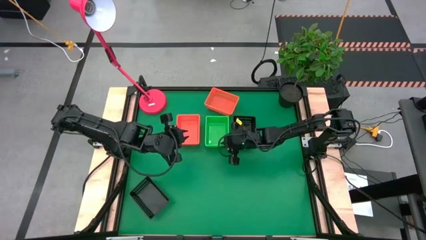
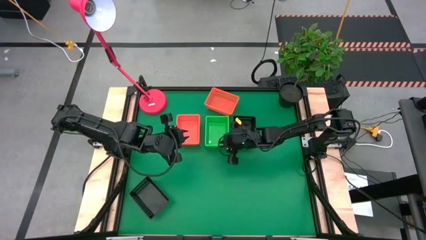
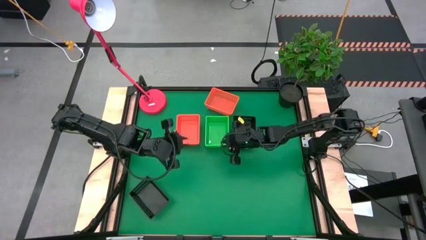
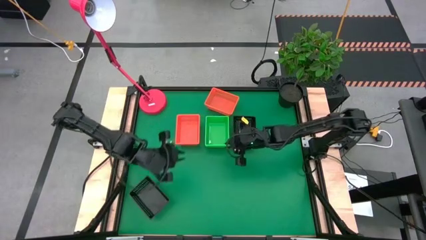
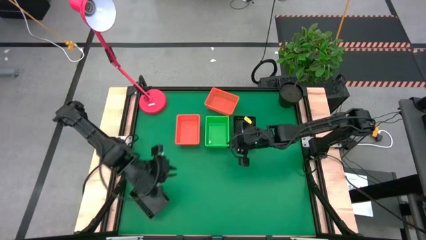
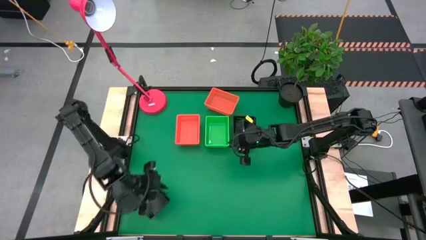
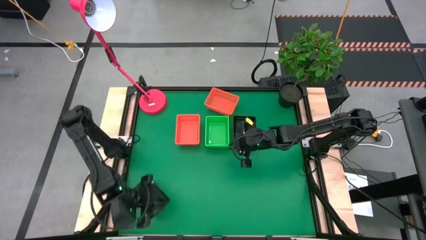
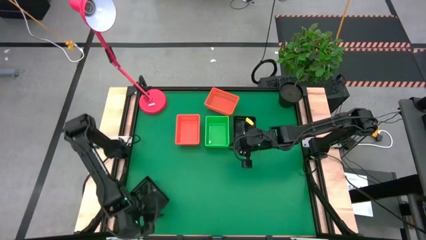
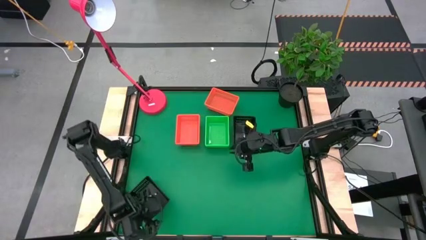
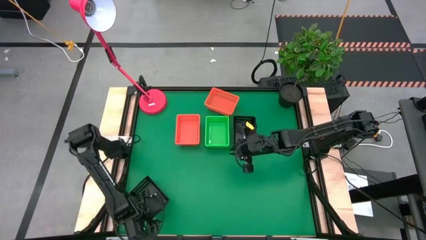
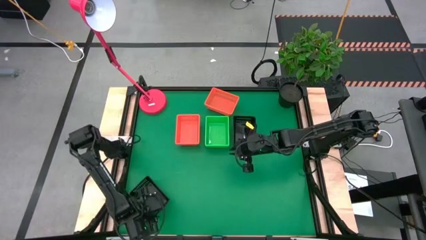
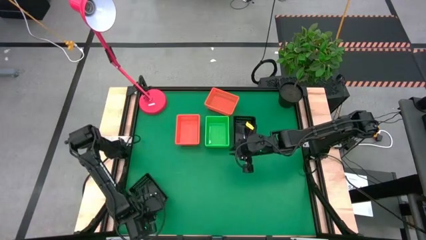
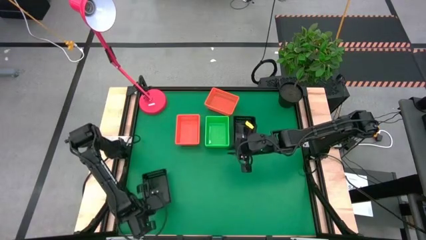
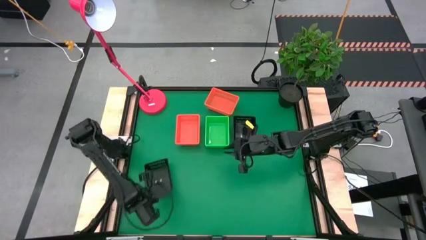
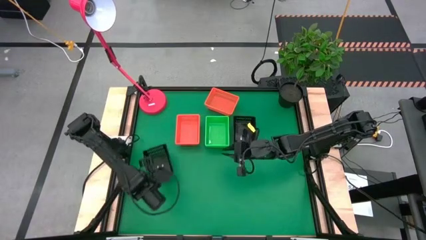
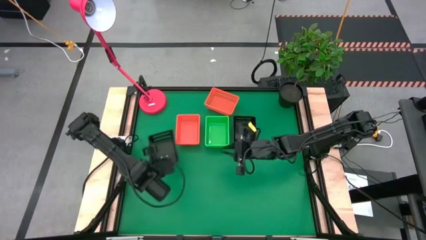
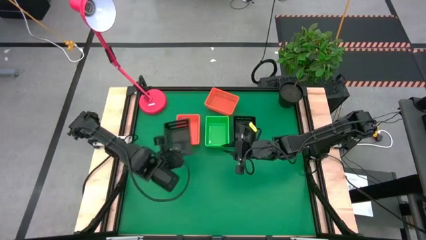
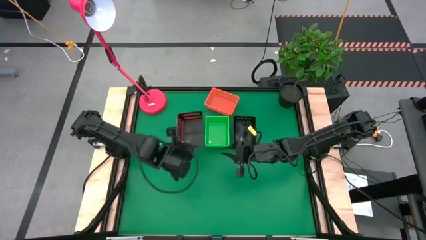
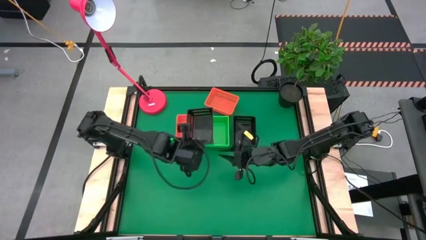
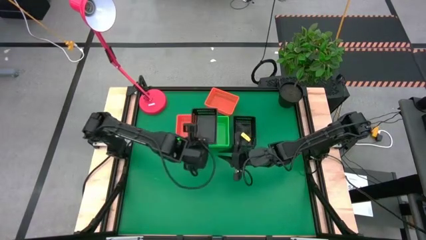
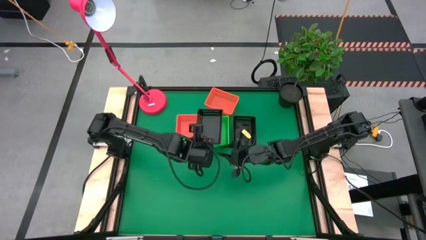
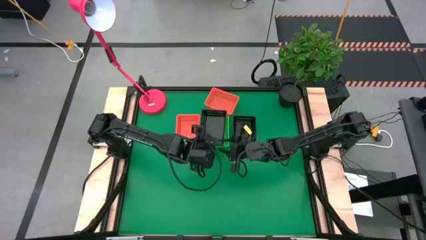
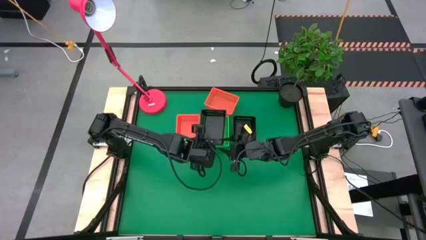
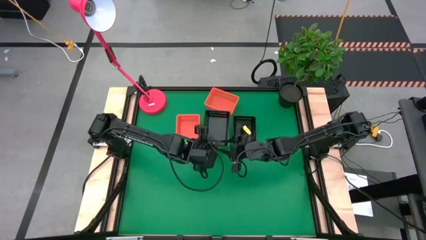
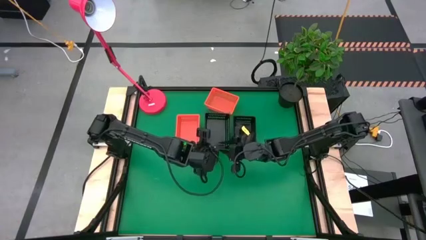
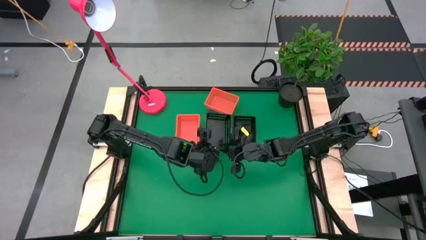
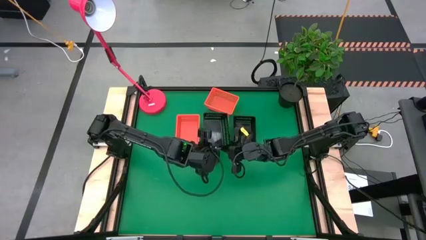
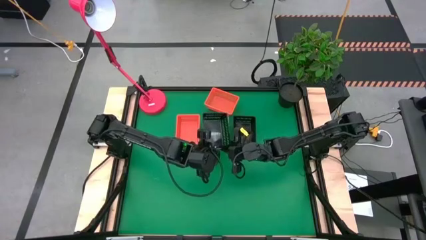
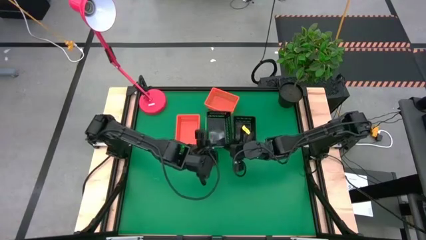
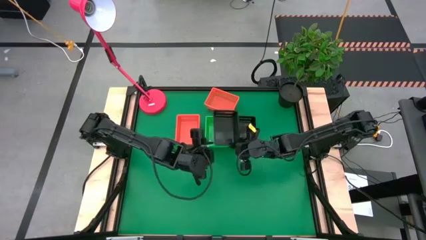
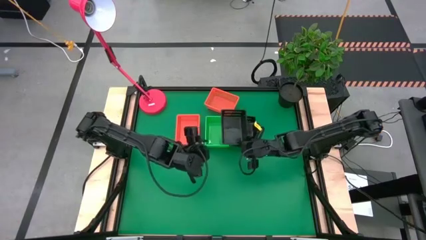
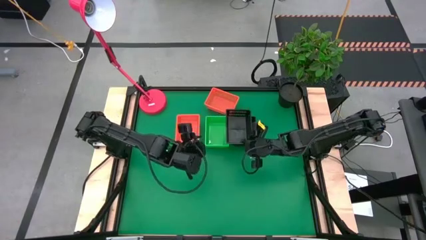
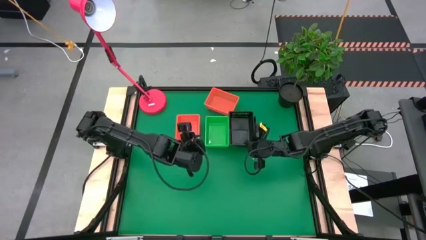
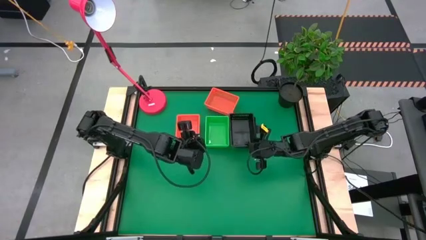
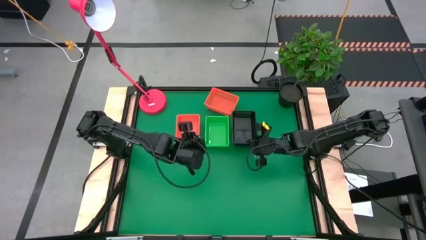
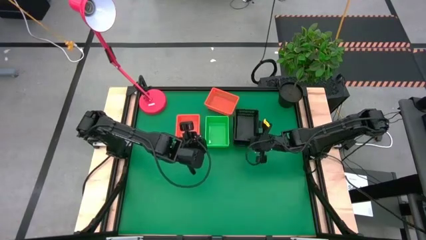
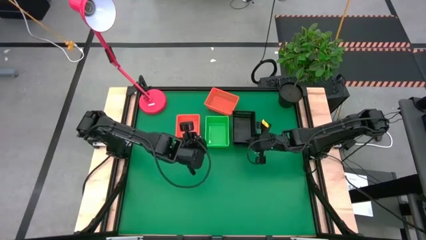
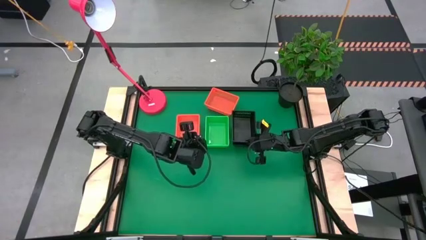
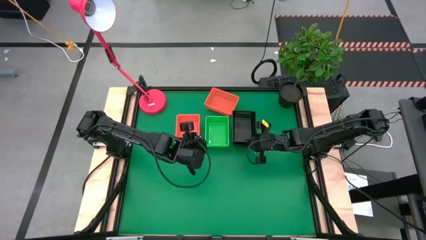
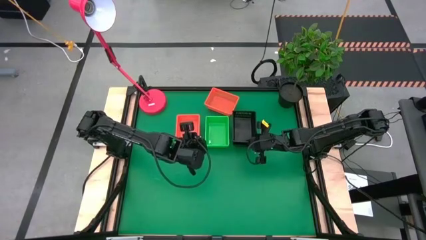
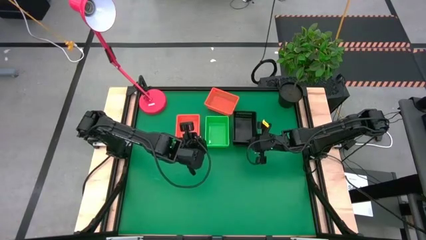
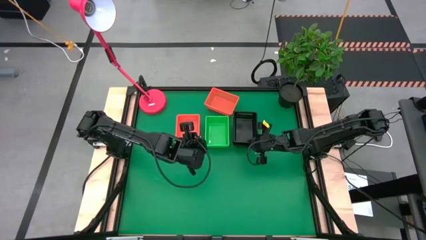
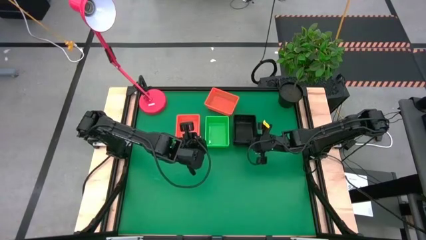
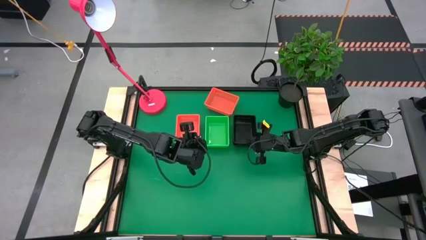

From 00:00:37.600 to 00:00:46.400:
Stack the bottom black basket on top of the other top black baskets

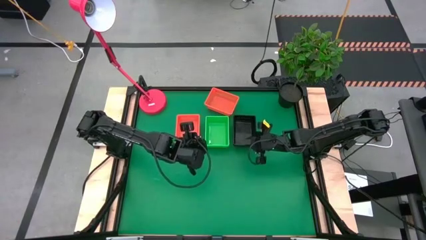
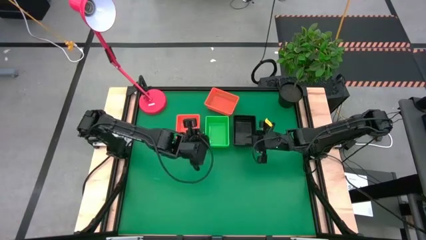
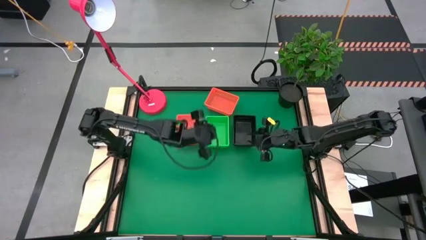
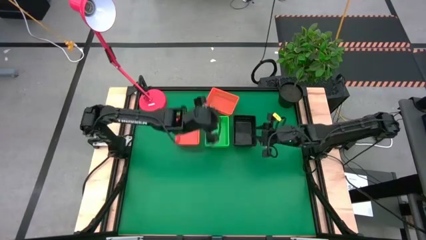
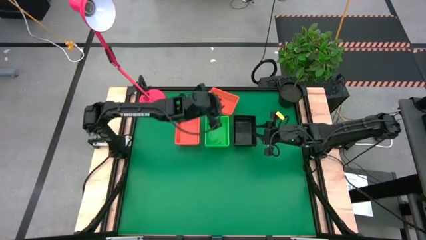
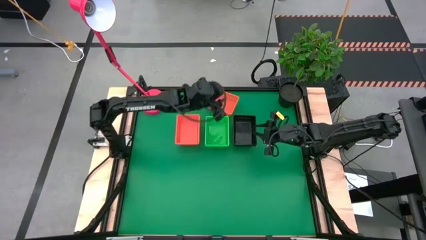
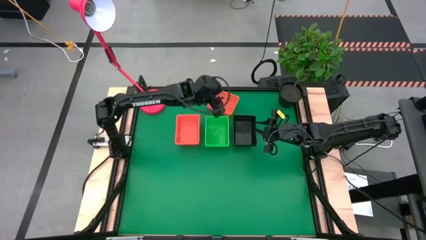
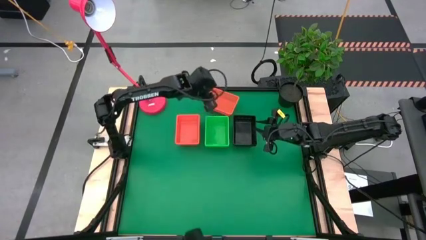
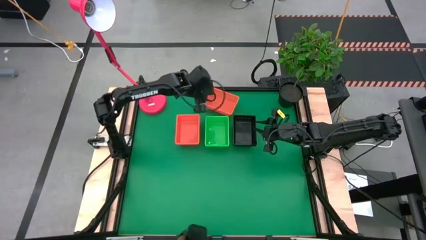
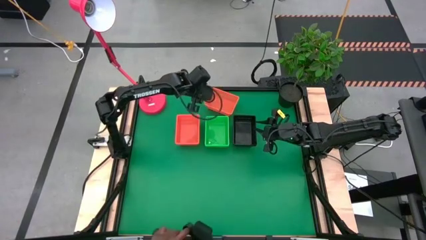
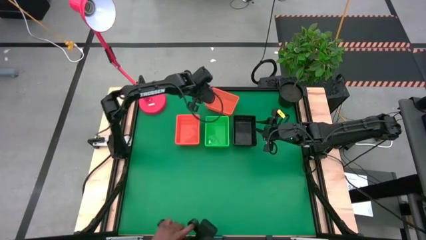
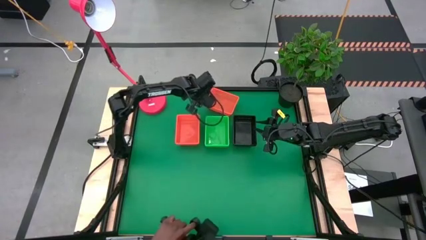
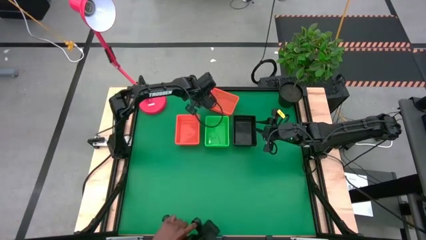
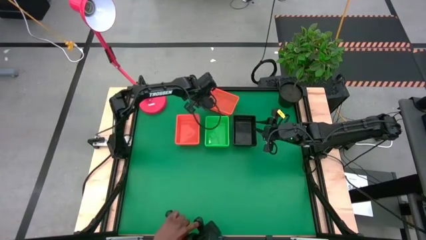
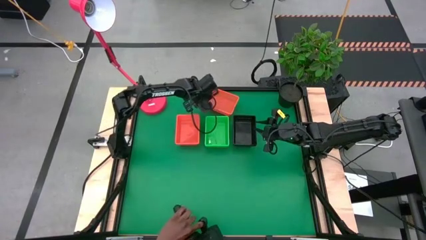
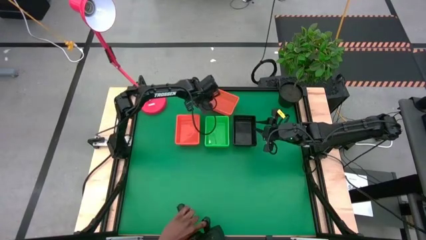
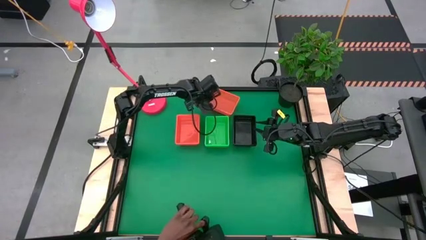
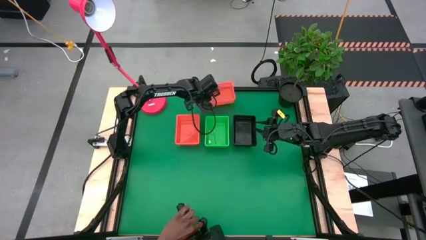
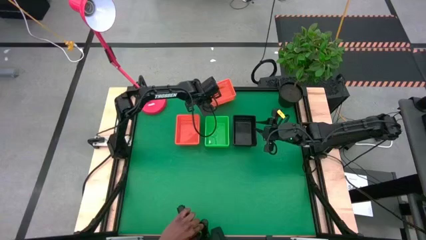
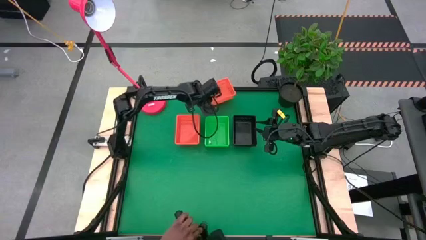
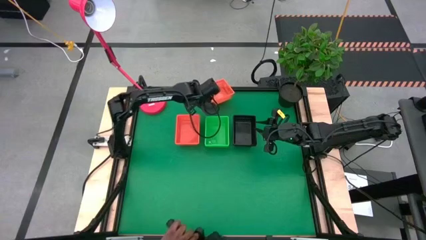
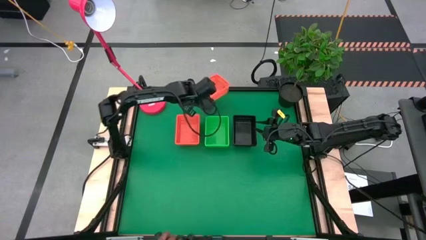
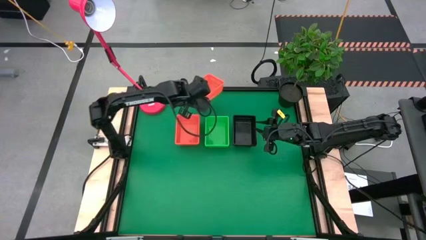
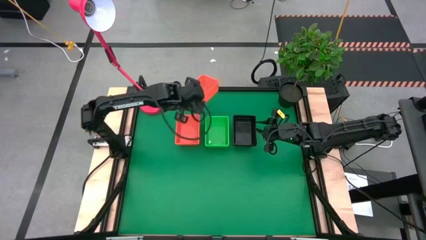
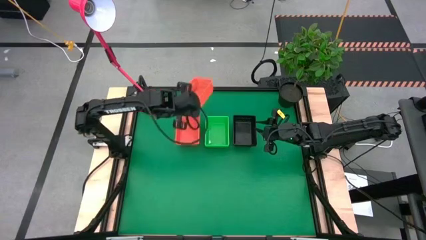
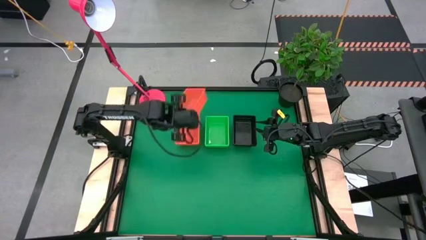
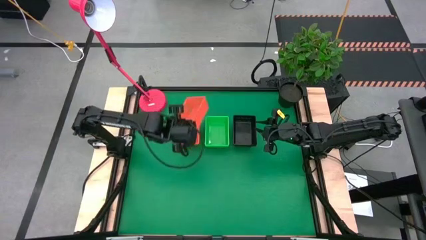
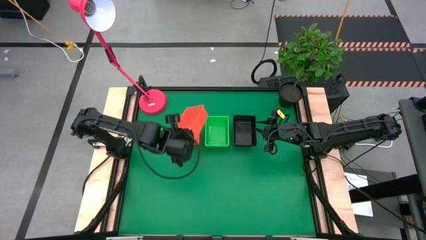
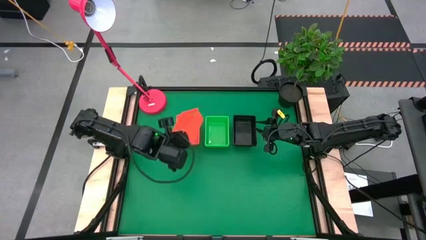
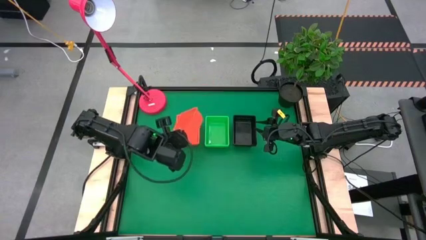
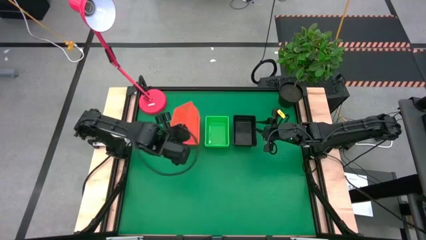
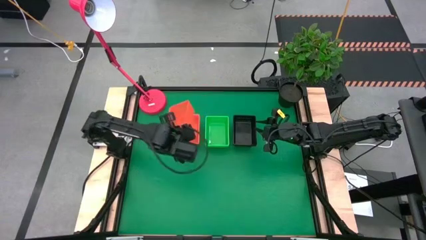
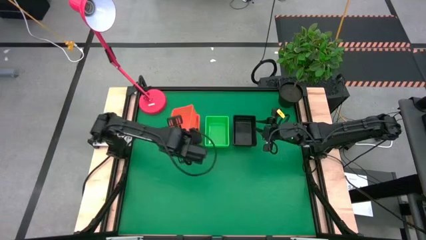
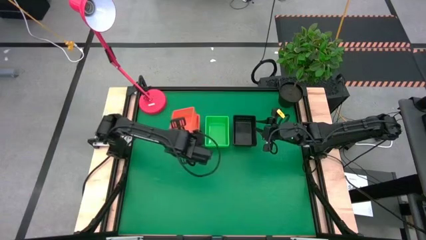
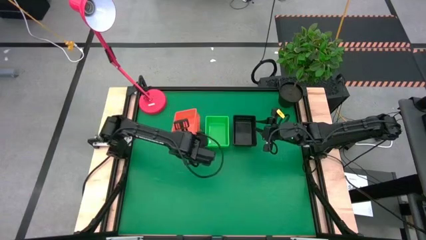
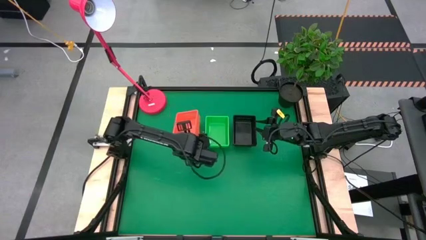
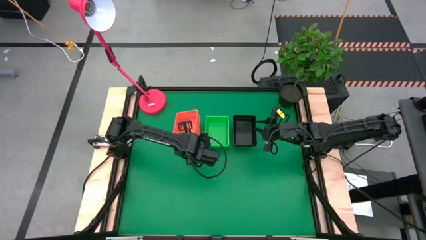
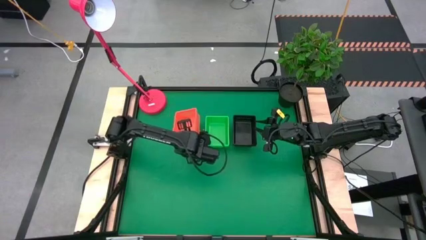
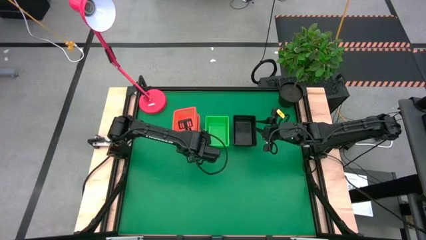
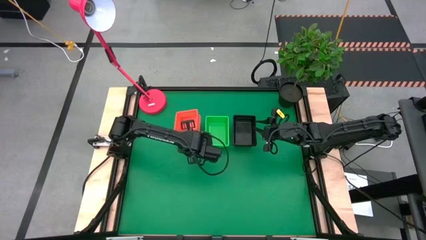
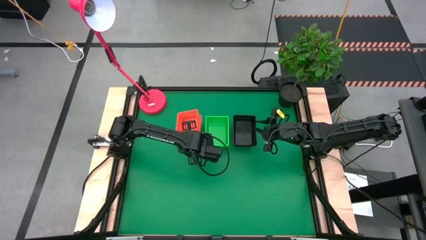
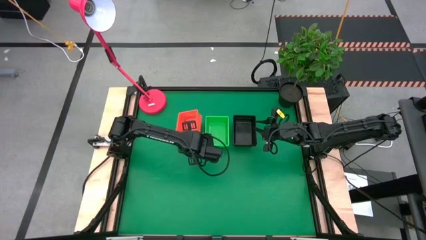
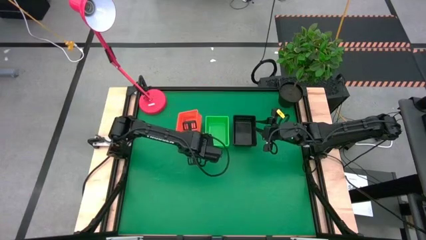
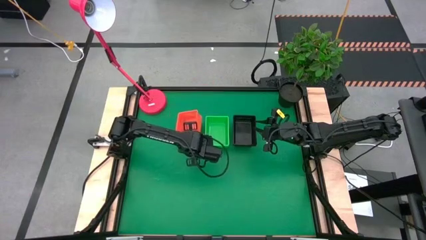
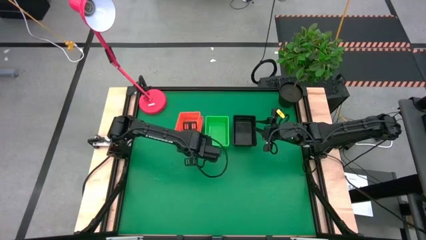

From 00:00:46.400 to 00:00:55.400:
Stack the top orange basket on top of the other bottom stacked orange baskets
